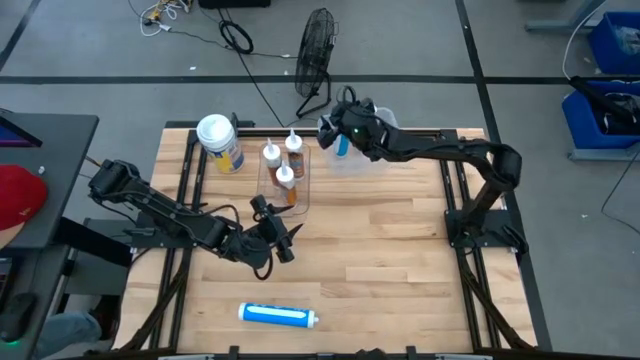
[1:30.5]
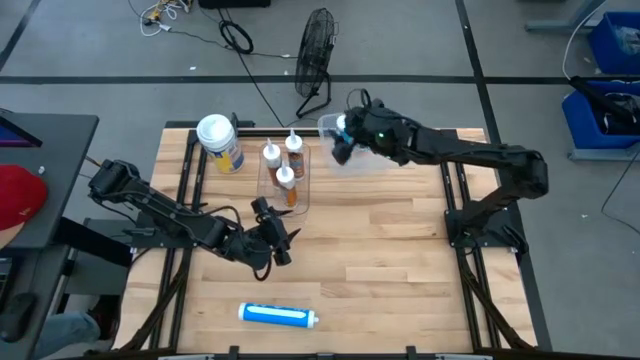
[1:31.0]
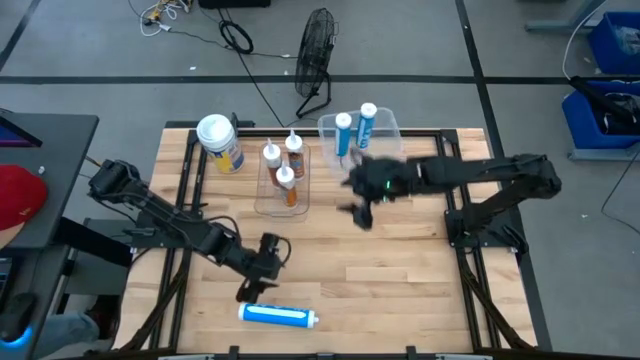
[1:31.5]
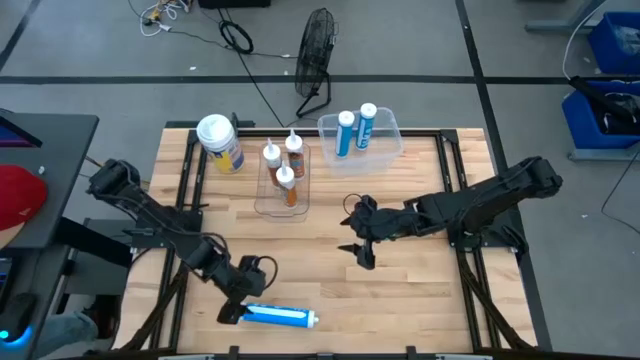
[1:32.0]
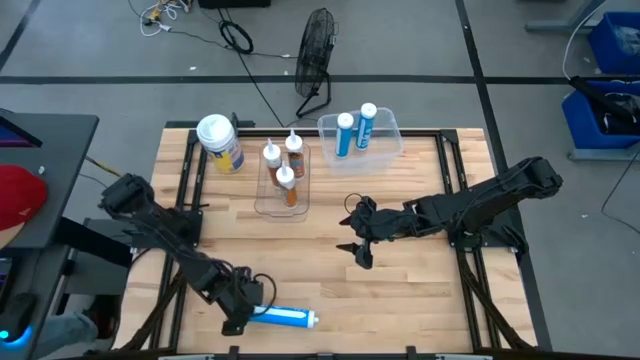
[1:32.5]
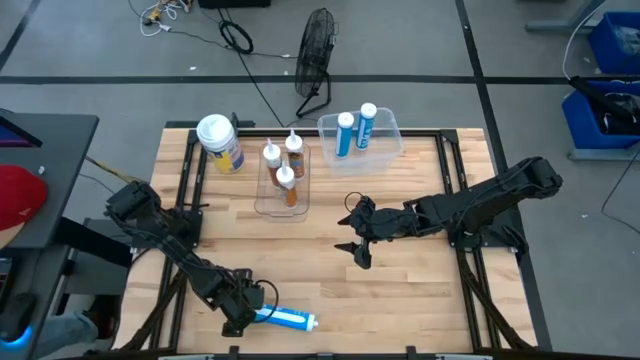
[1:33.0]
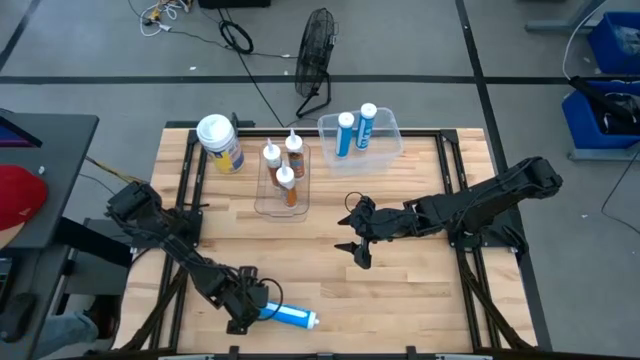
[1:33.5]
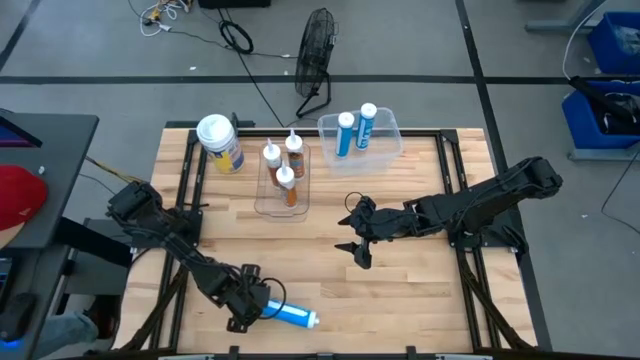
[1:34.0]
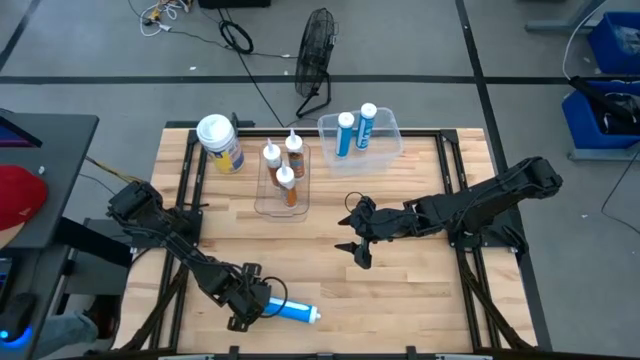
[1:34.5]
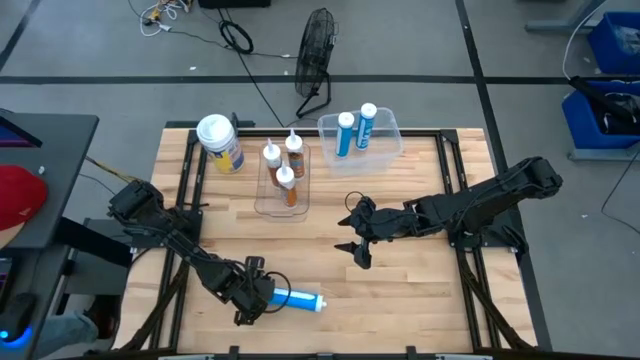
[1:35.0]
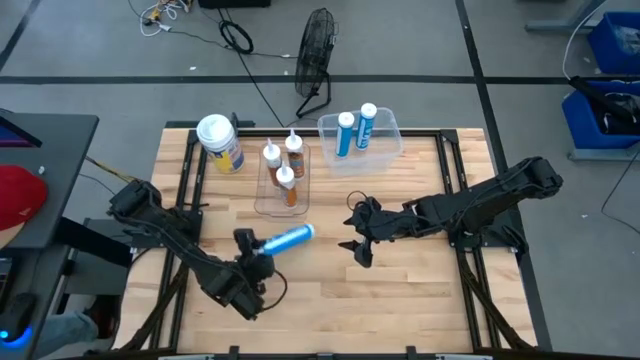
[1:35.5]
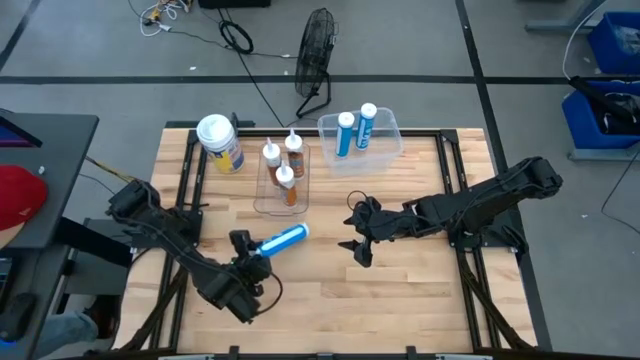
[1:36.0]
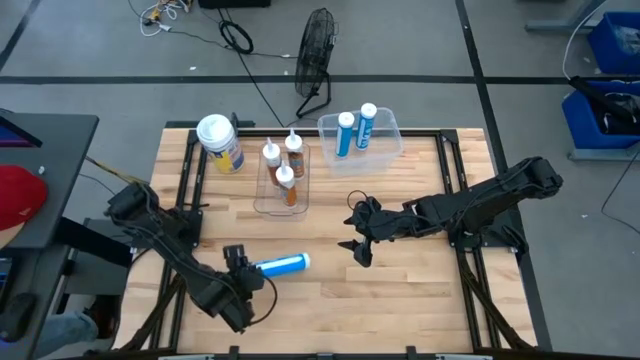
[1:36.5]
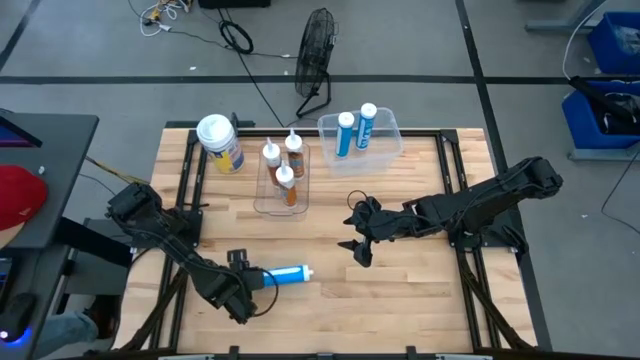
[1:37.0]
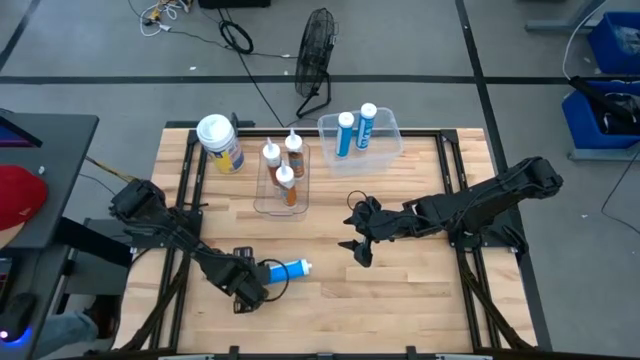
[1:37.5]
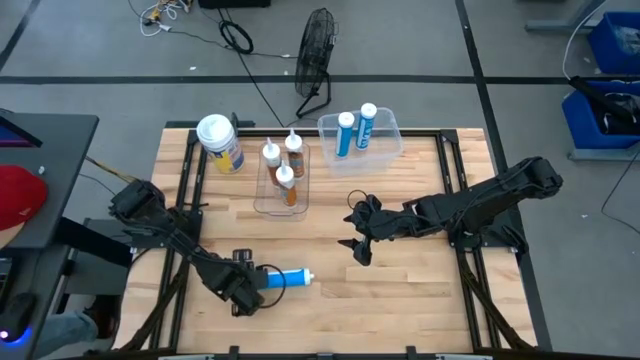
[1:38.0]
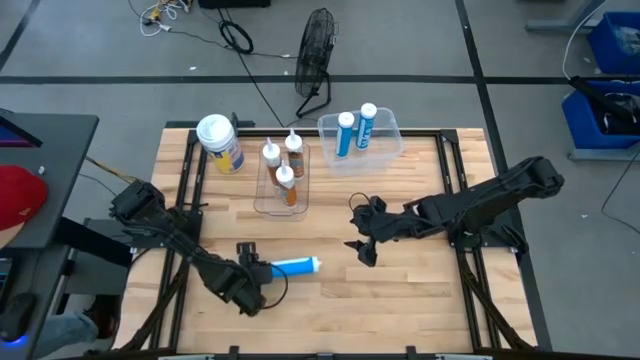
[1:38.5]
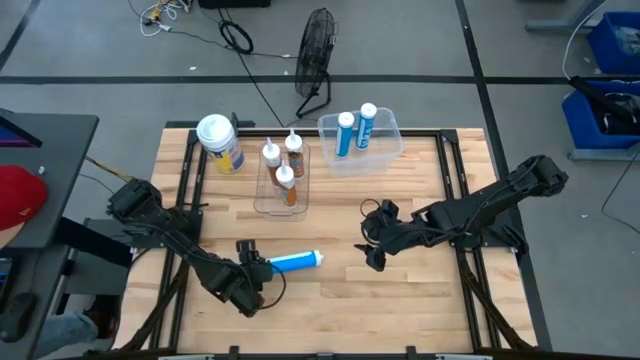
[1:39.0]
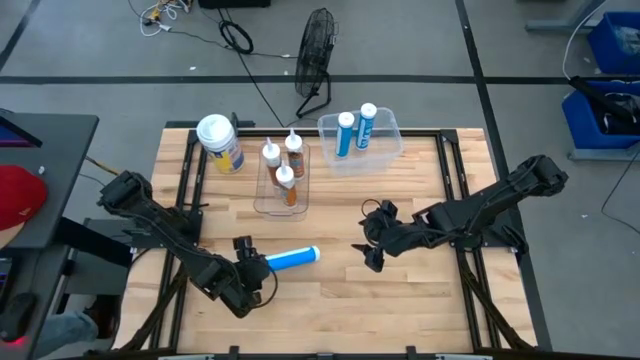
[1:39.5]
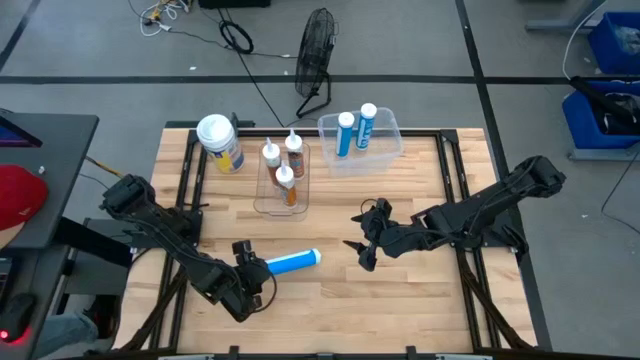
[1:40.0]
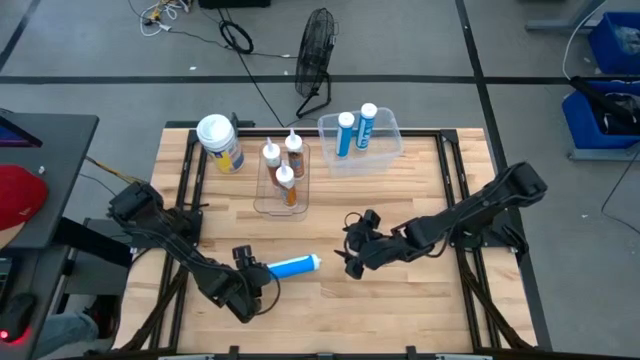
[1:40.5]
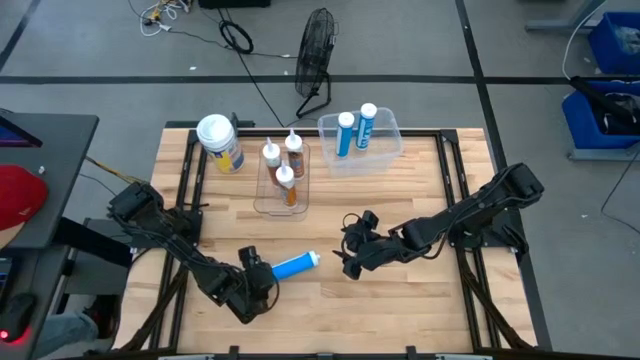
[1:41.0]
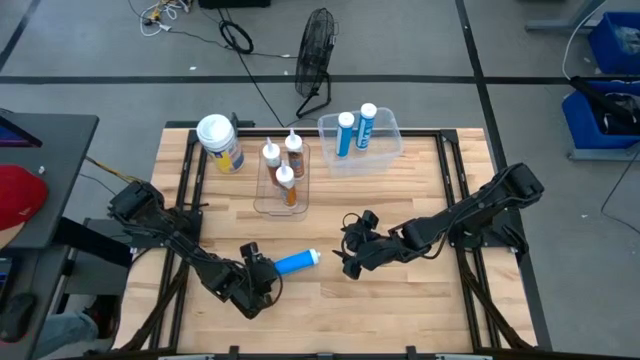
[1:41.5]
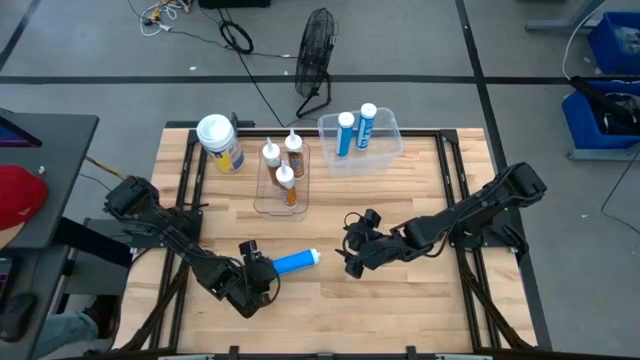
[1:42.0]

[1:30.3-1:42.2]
Task: Pick & place silicon tubes, Sealant and Lysol wipes
Put the blue sealant into the white bin

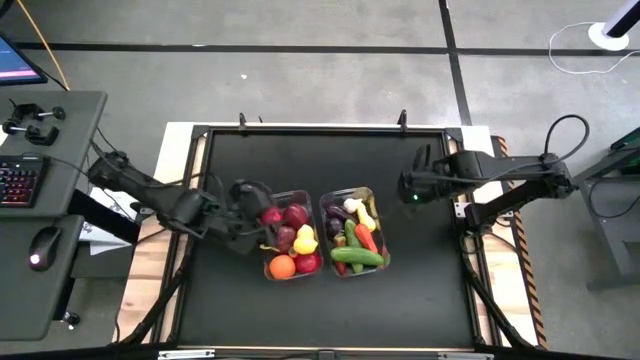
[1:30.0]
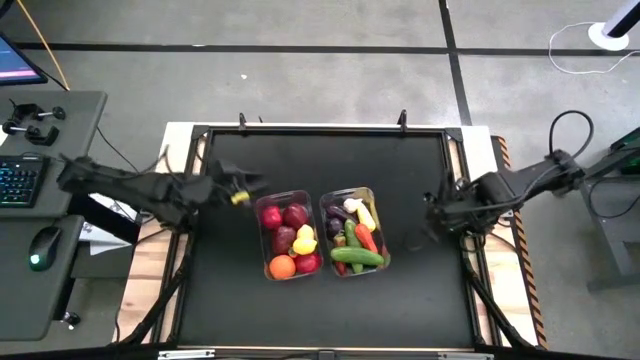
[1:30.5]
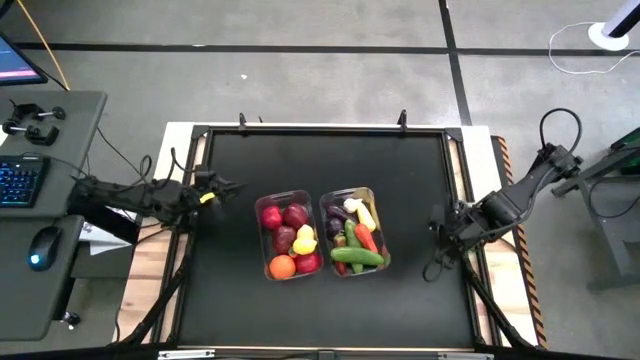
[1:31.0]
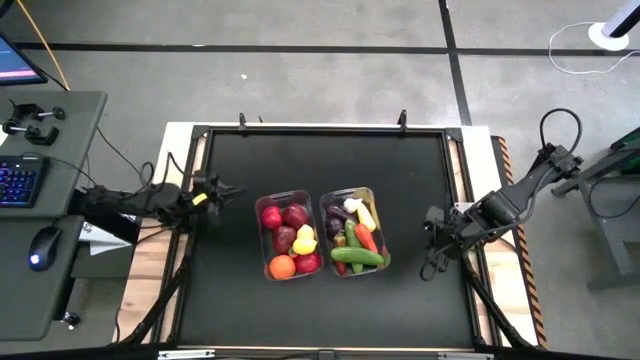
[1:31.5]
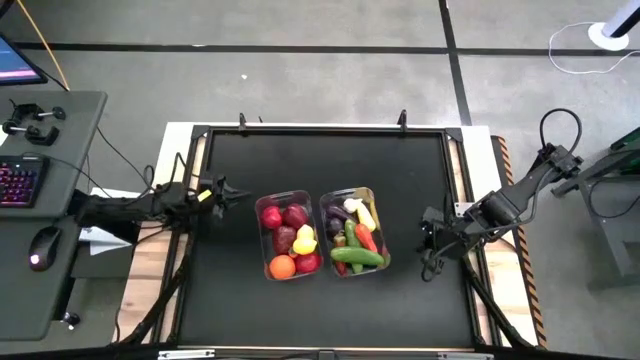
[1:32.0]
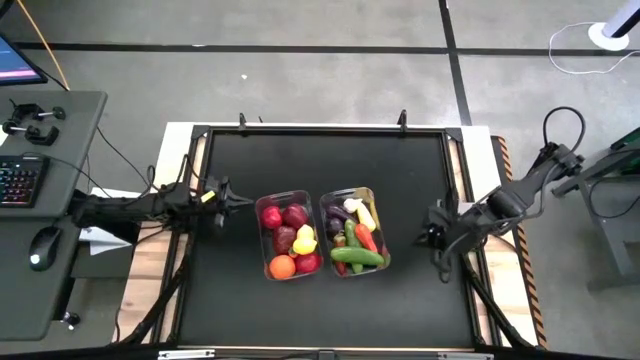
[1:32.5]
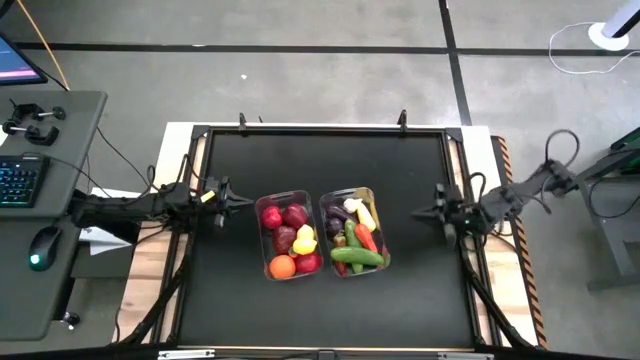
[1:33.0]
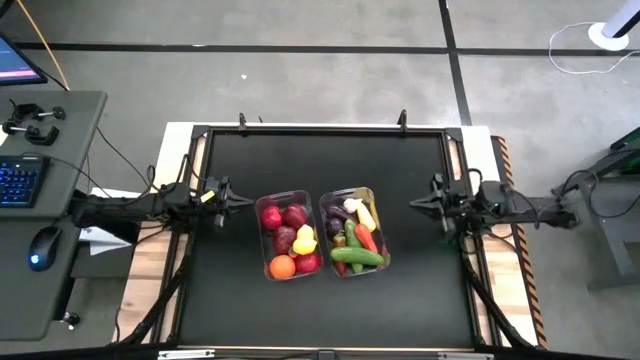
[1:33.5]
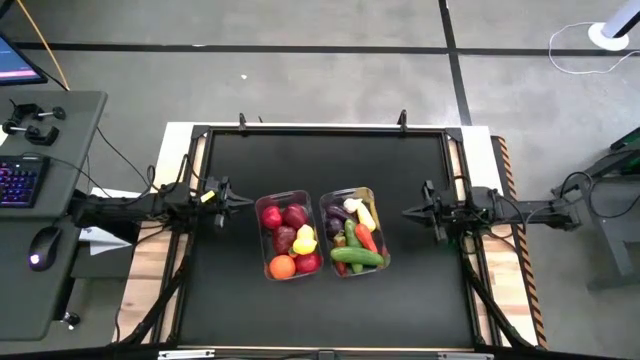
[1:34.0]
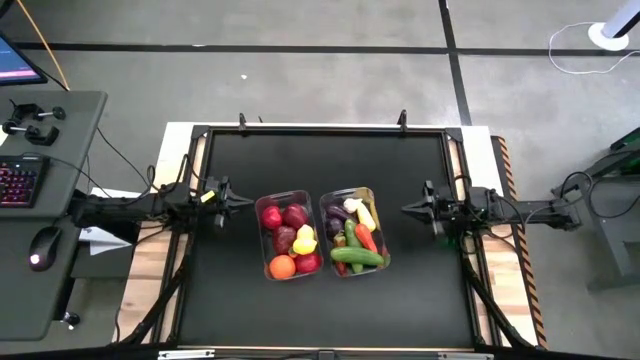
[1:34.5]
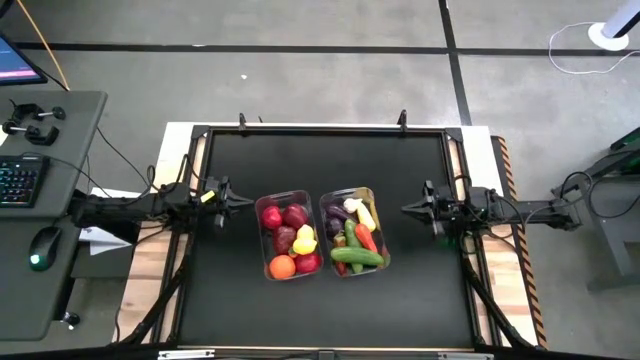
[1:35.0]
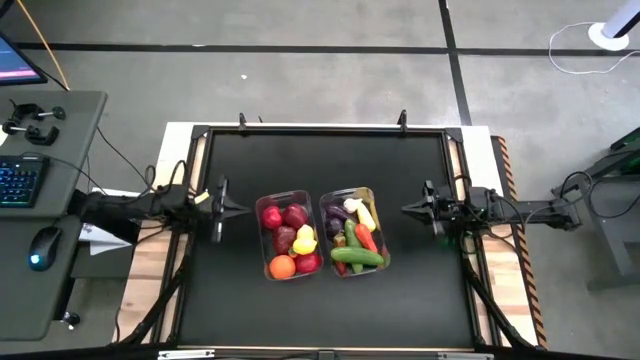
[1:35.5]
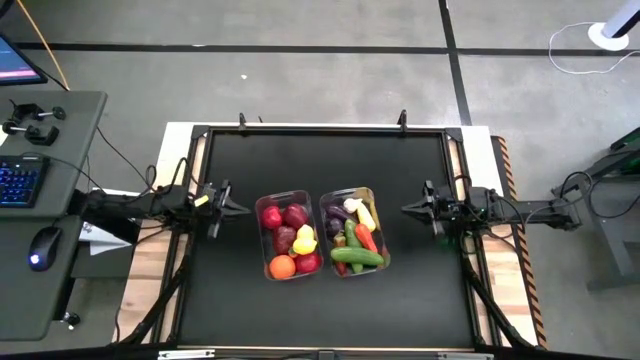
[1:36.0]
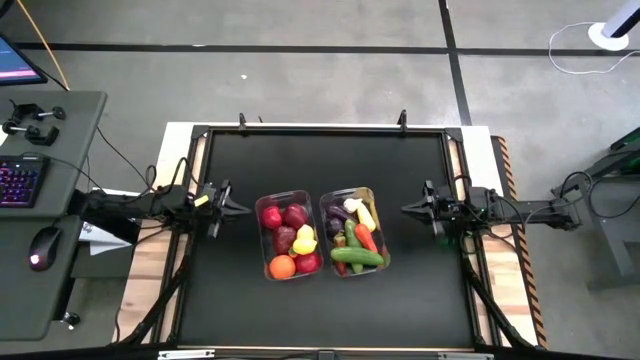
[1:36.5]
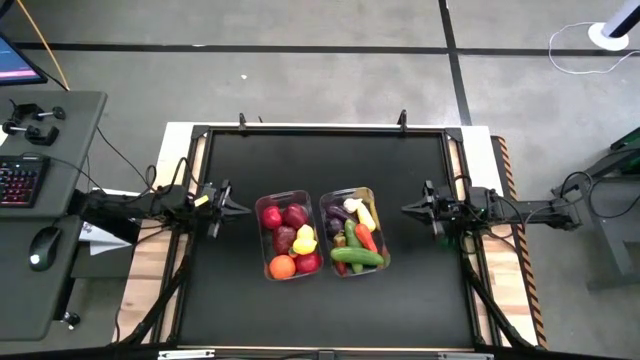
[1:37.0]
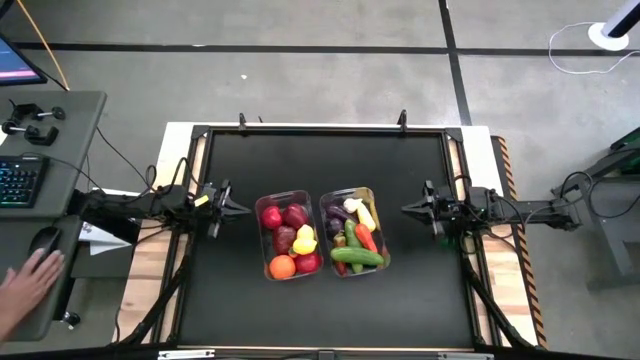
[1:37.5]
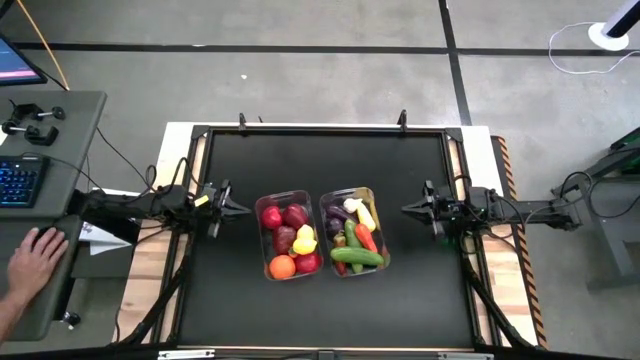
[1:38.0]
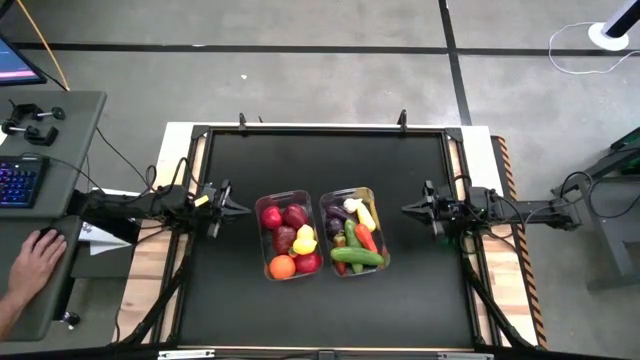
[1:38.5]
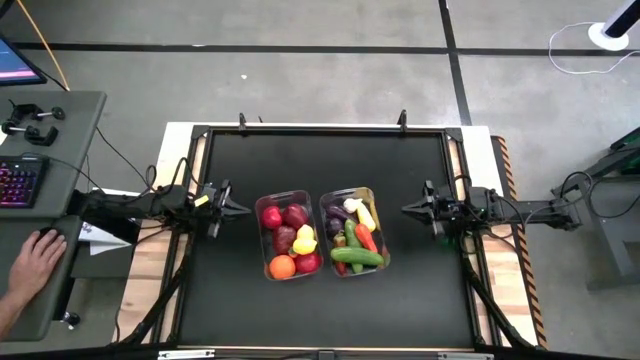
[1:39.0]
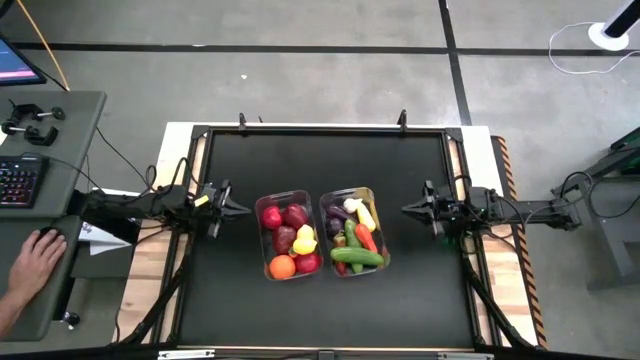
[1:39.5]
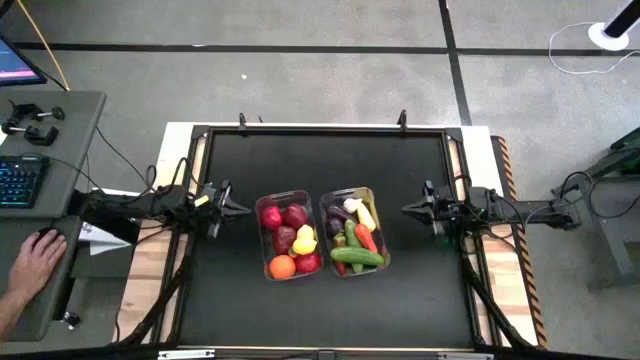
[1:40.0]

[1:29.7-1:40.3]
Task: Sort produce into baskets
Return to Home Position
